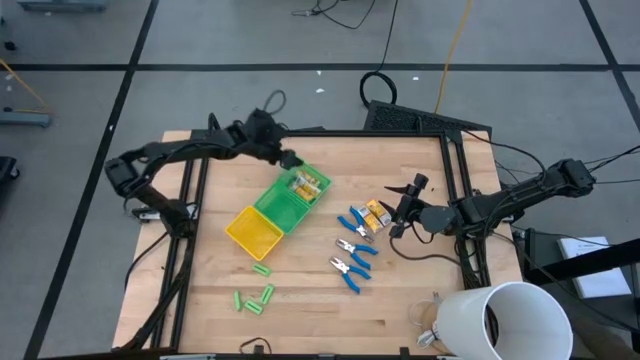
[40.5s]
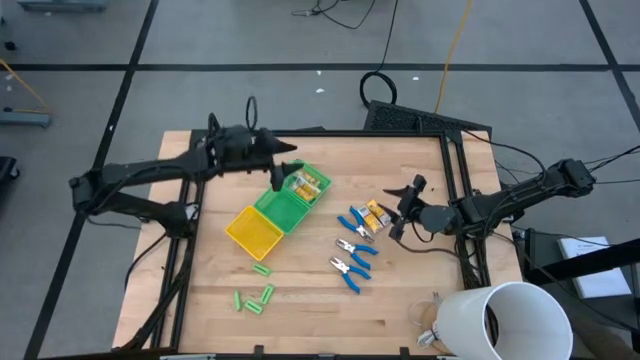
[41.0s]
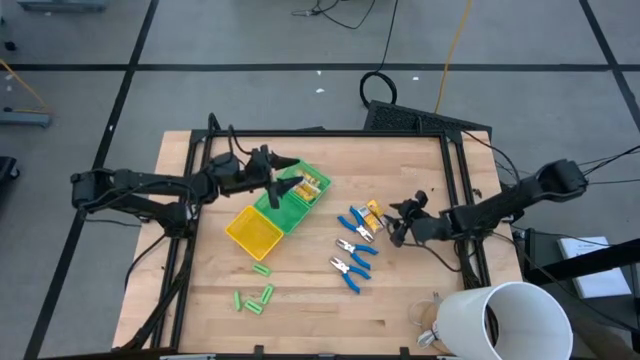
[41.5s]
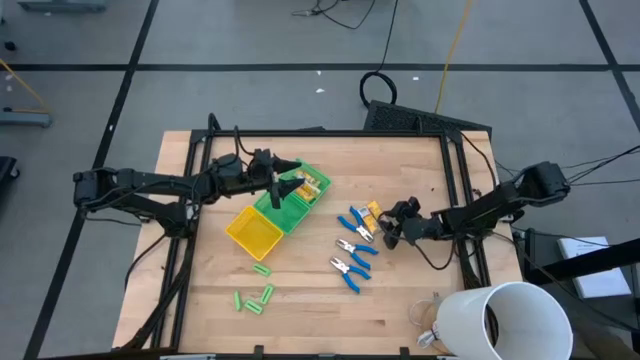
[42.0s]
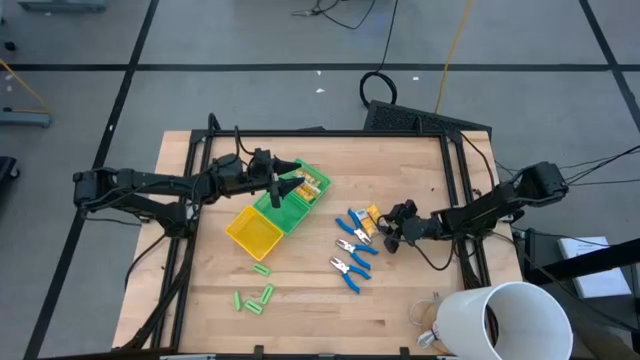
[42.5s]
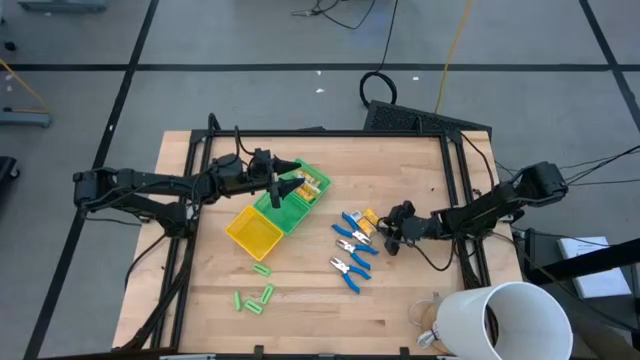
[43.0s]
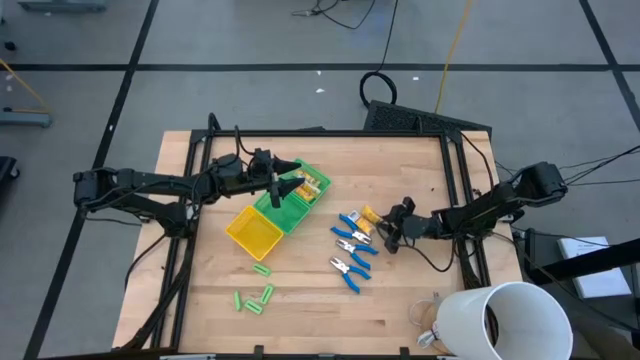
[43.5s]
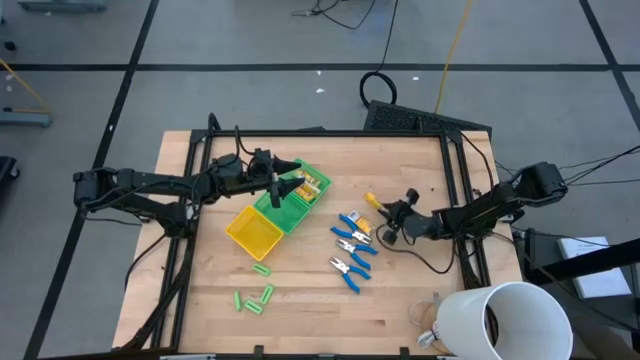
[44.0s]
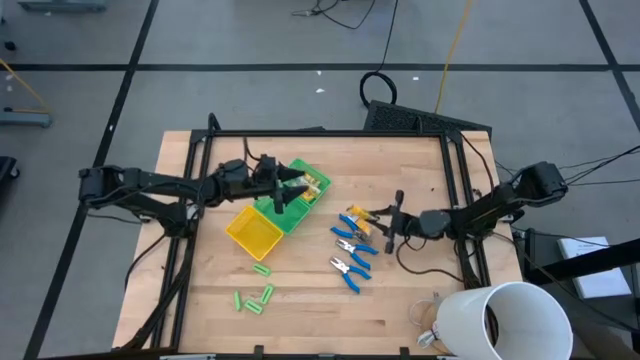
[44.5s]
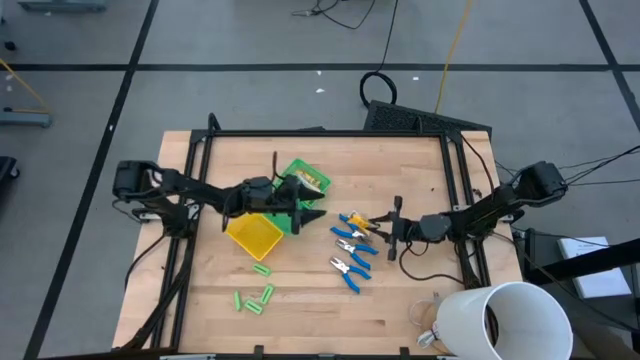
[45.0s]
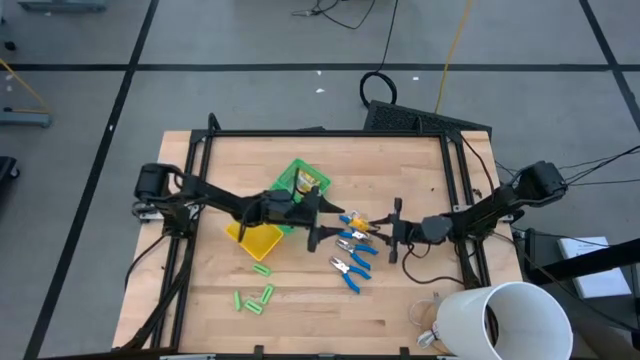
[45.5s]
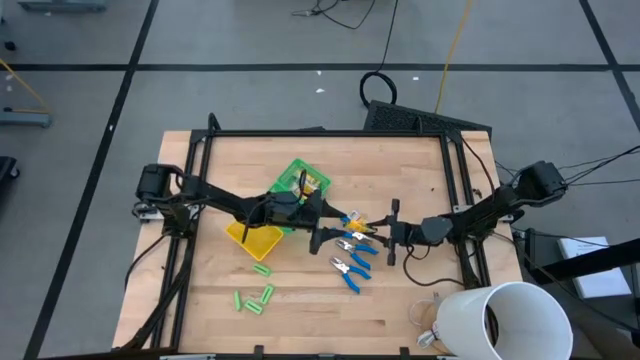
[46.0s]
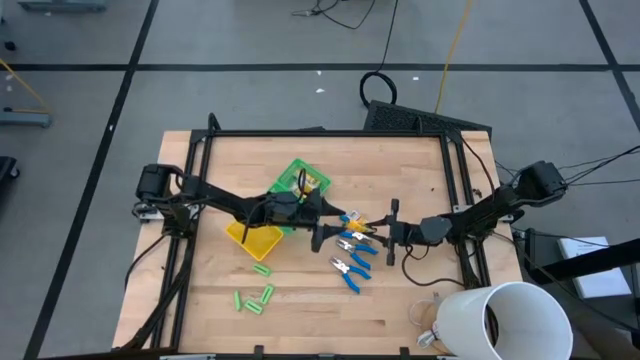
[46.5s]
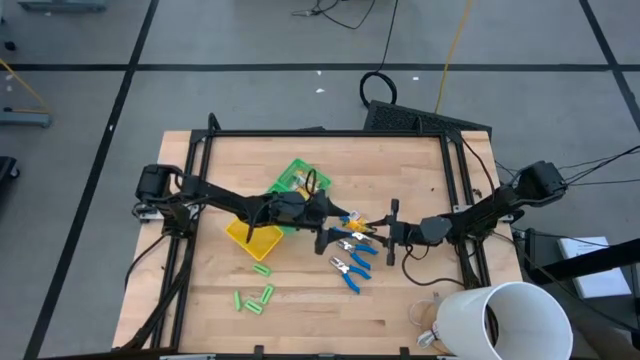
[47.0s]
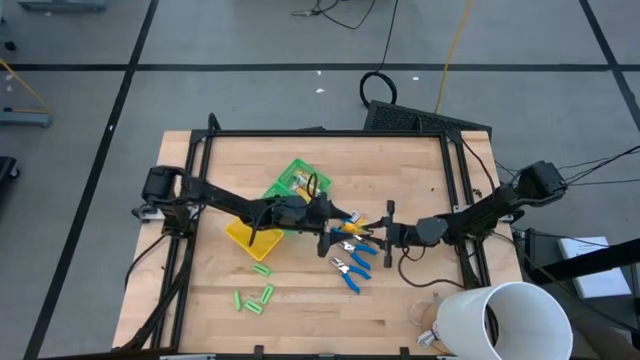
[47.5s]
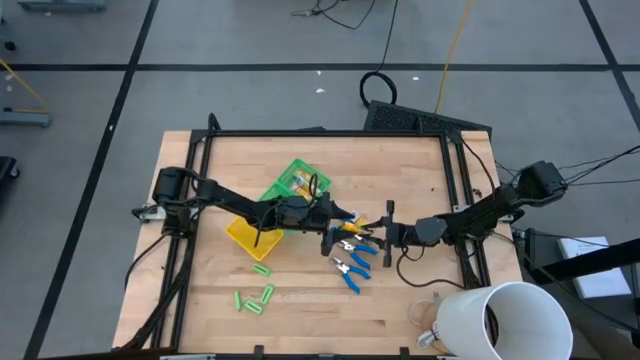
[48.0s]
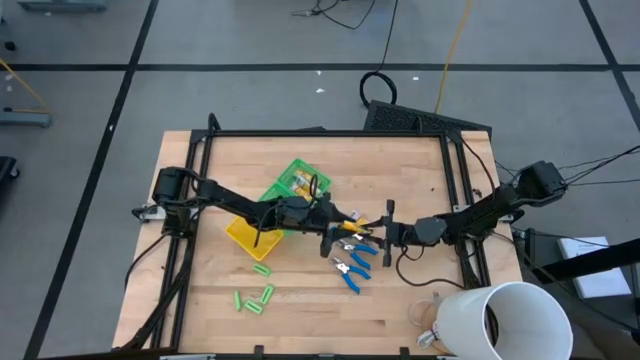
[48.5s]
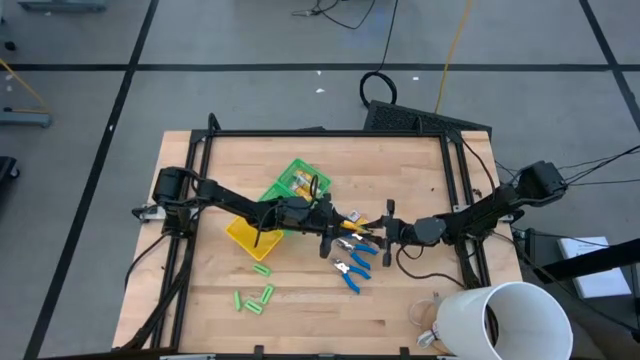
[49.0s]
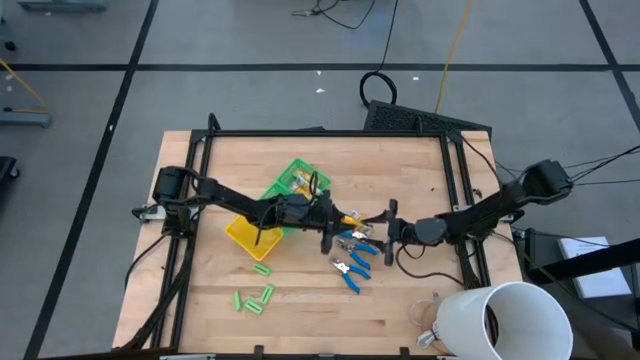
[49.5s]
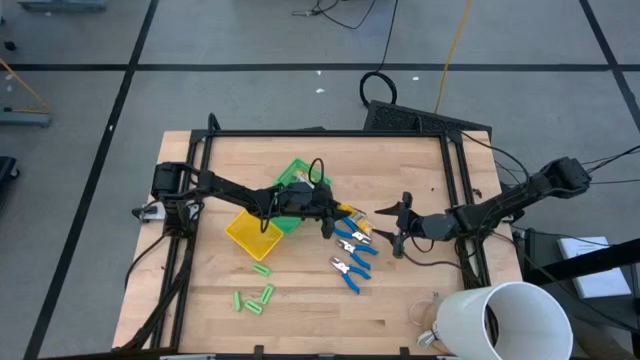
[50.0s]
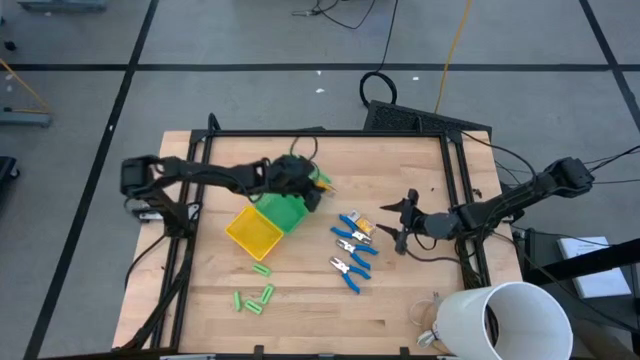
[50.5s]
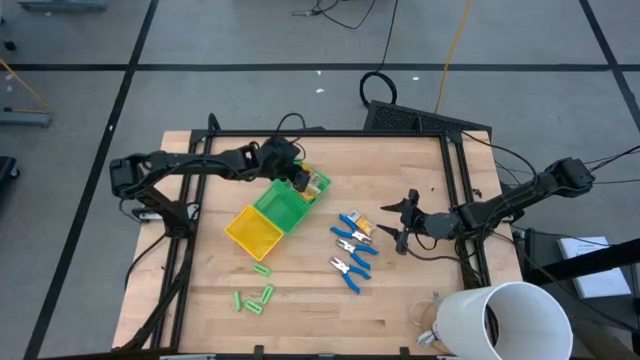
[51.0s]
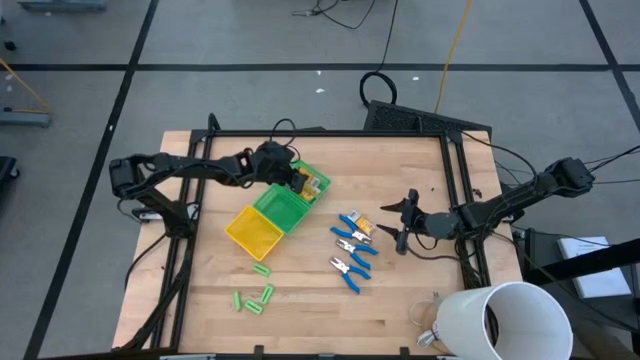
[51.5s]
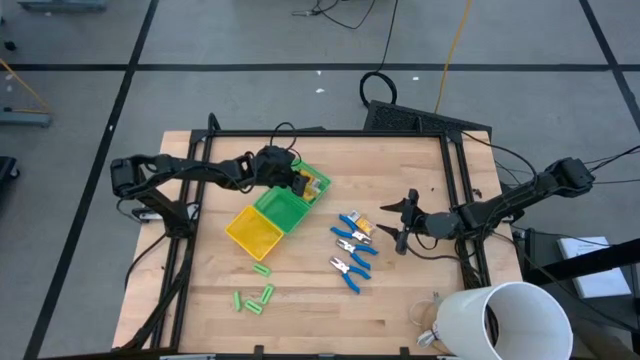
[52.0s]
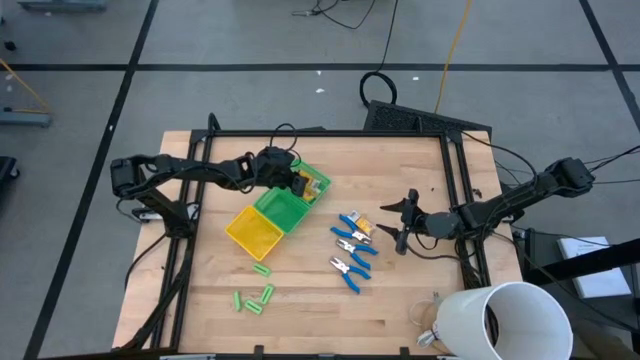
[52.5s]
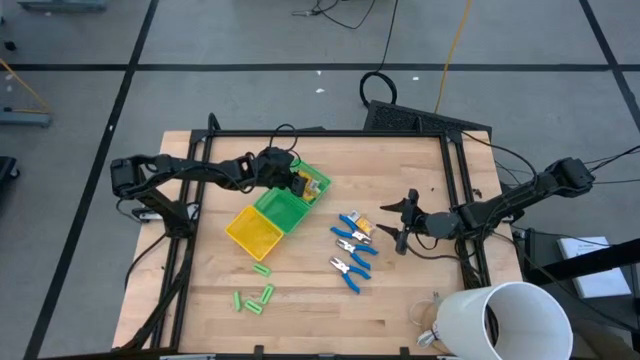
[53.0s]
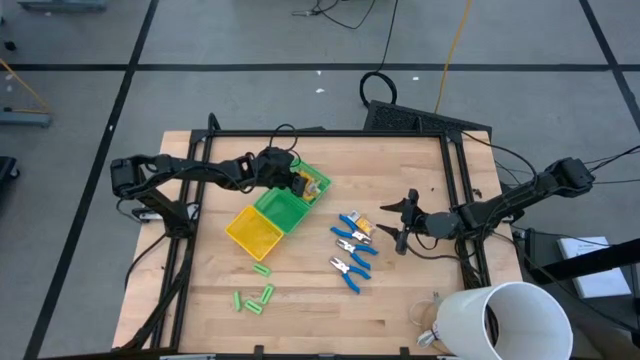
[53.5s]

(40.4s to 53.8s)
Task: Pick & Place School Supplies
Put the crayon box into the top green bin

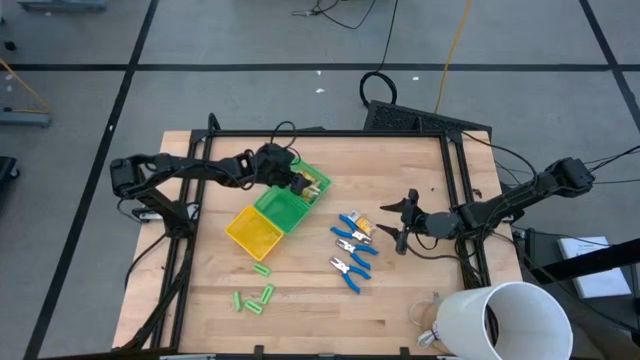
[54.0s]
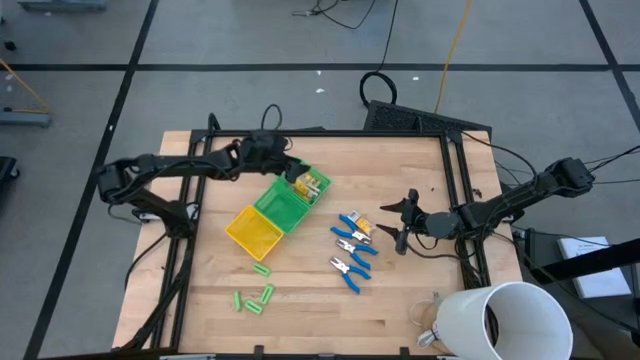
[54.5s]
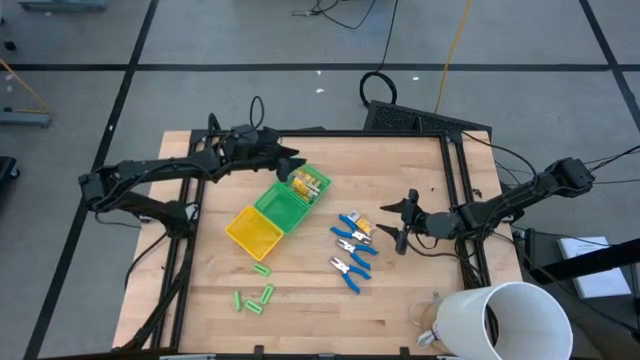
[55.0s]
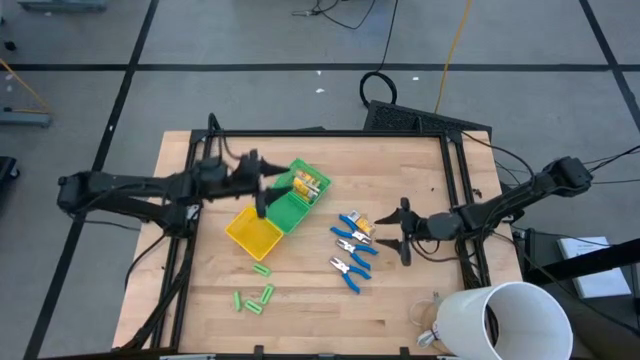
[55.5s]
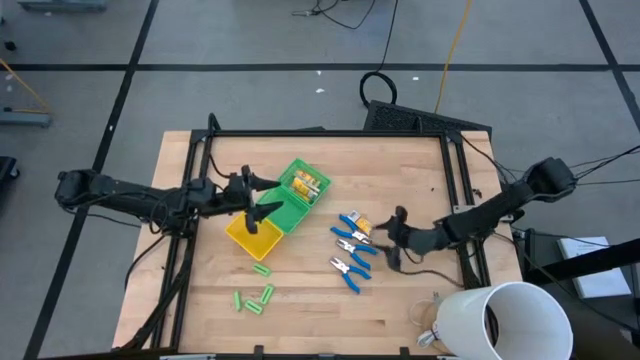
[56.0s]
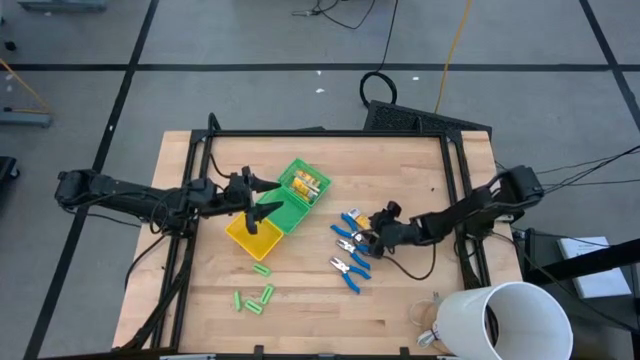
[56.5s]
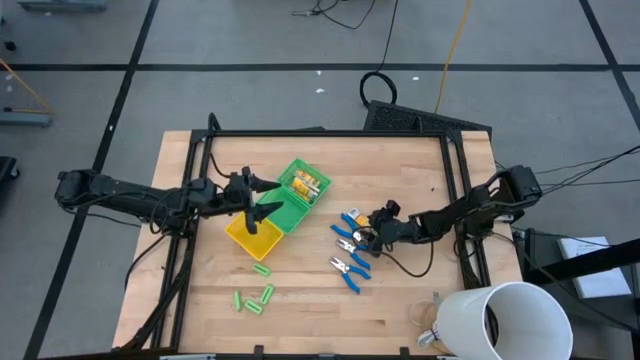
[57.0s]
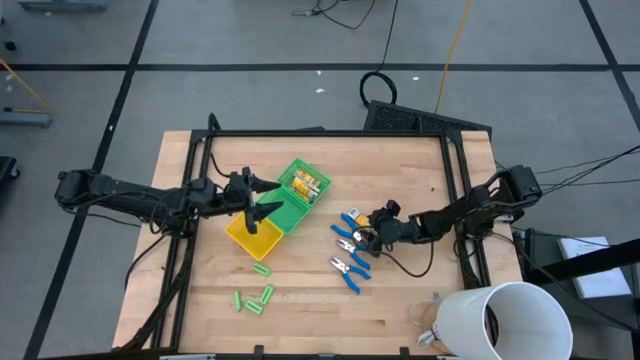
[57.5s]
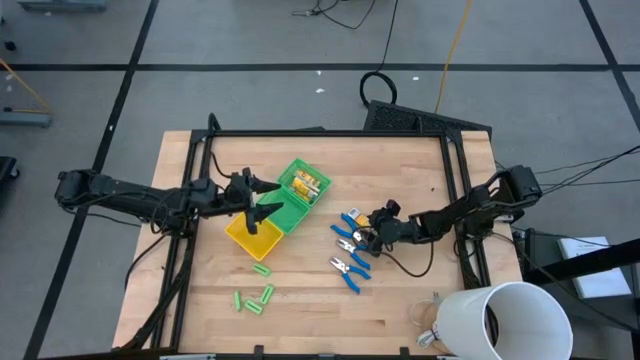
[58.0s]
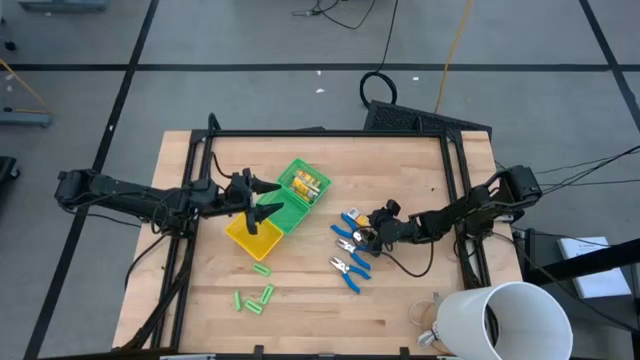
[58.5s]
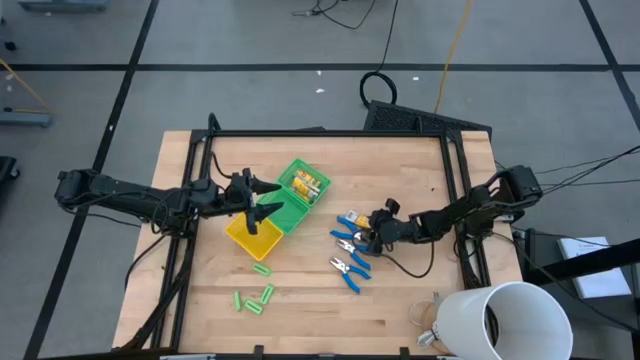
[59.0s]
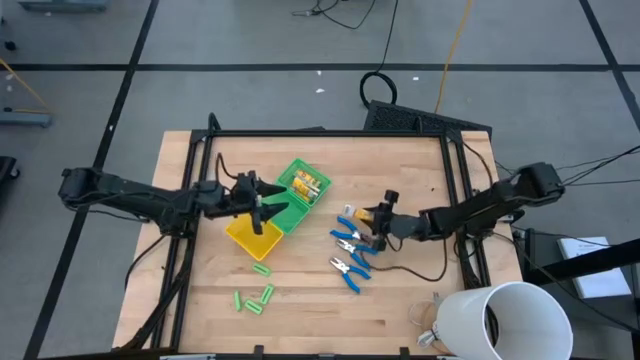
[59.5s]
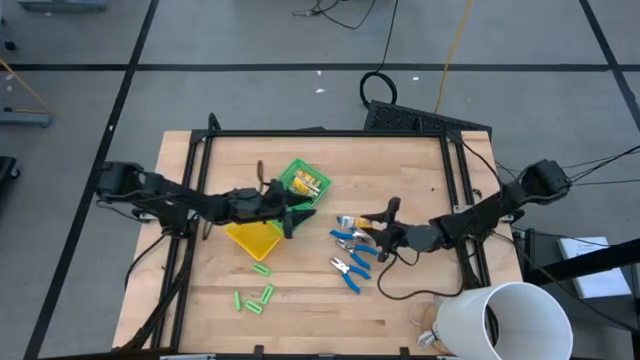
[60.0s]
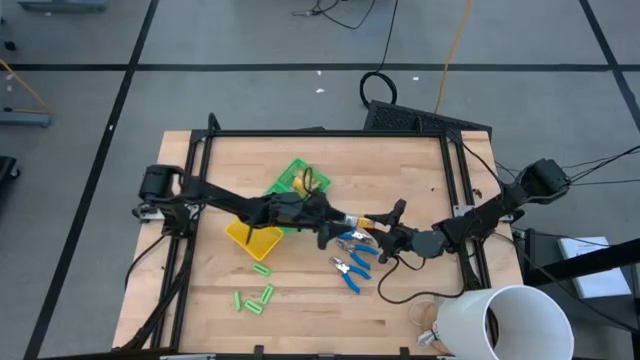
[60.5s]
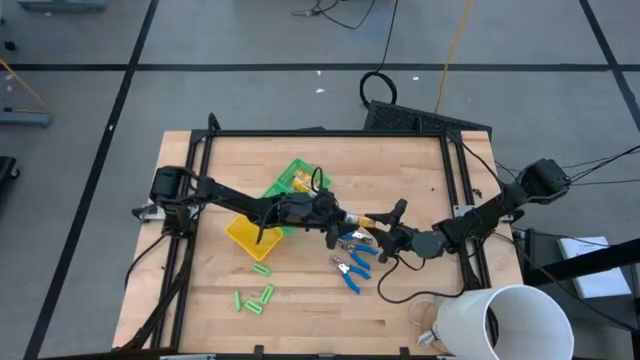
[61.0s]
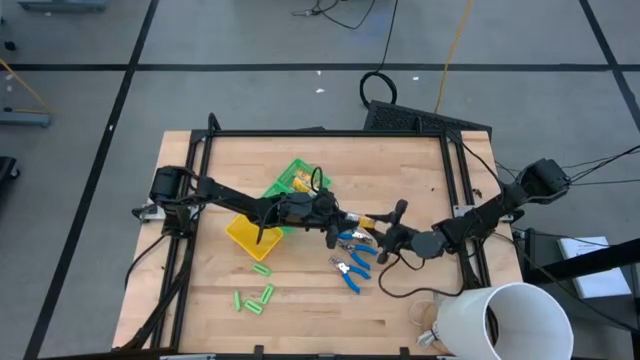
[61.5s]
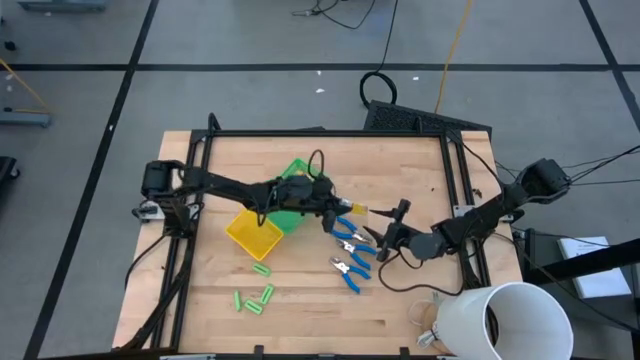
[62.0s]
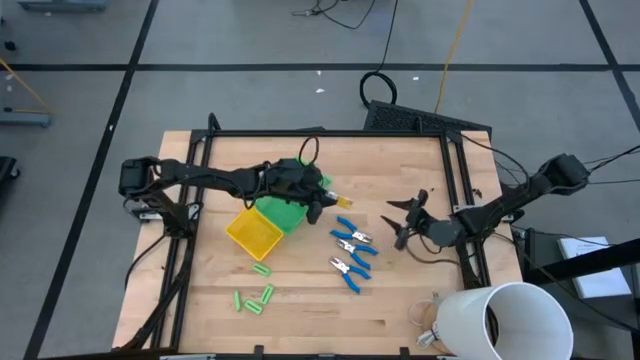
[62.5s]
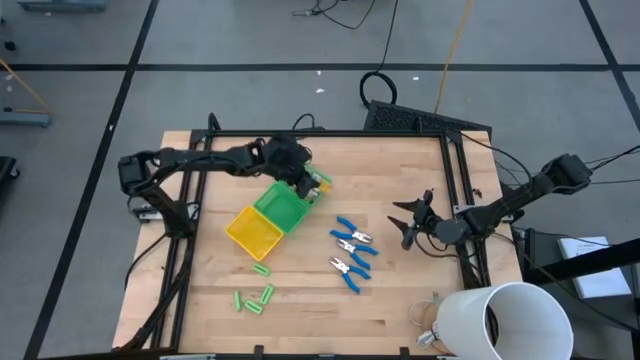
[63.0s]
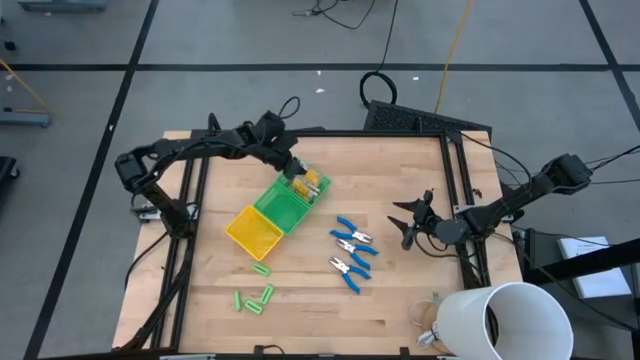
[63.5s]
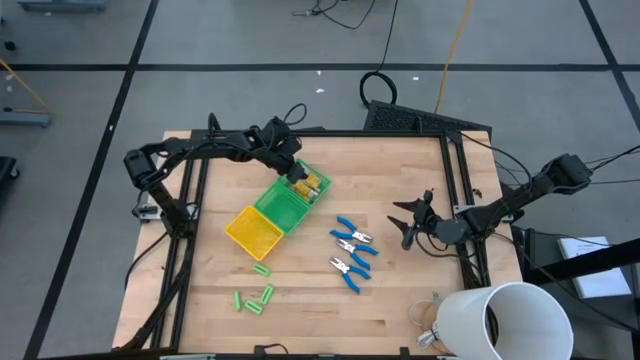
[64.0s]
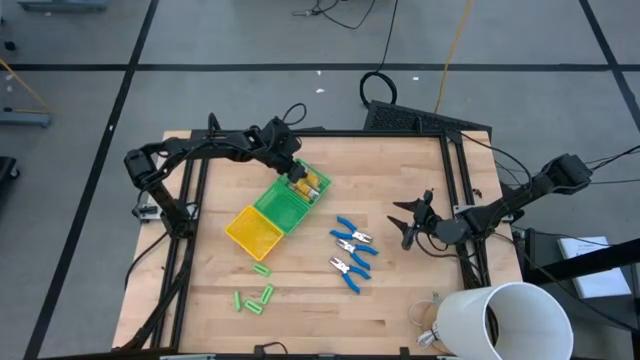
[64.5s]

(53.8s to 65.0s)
Put the crayon box into the top green bin
